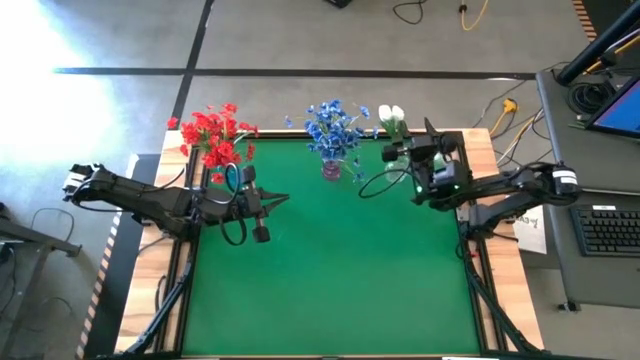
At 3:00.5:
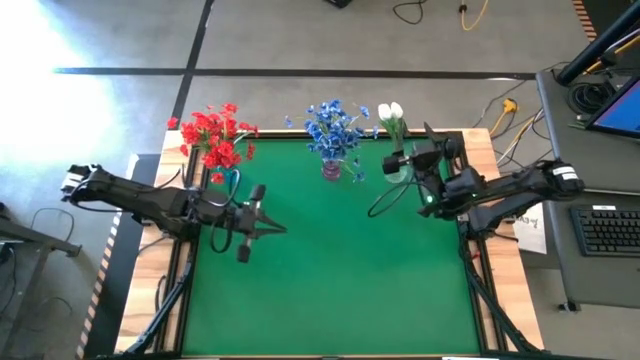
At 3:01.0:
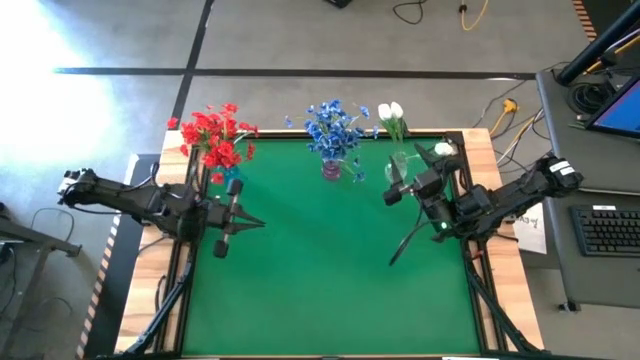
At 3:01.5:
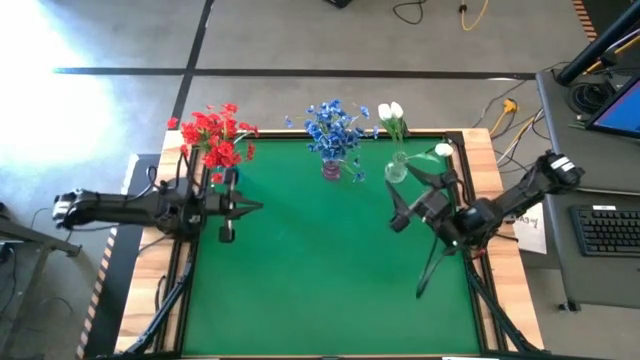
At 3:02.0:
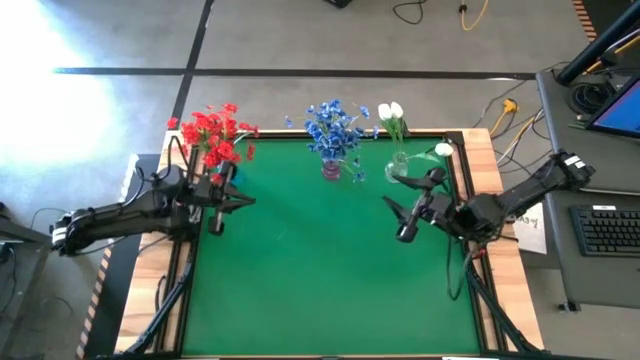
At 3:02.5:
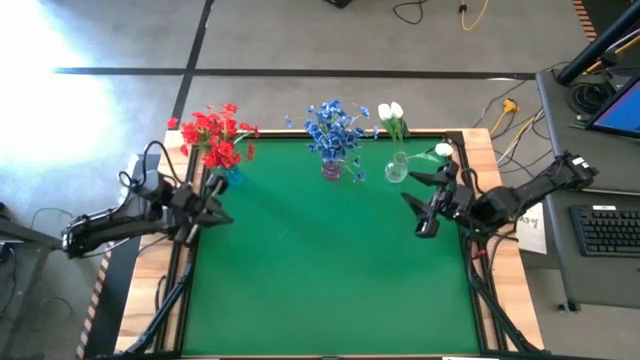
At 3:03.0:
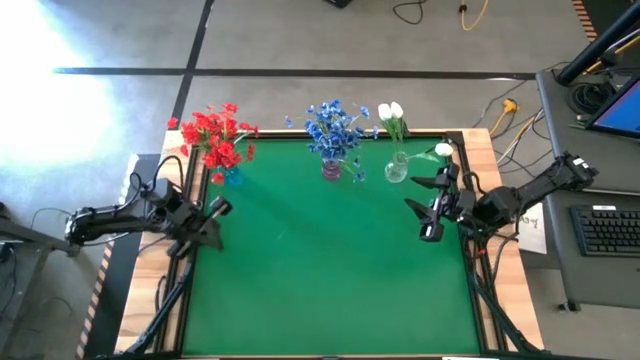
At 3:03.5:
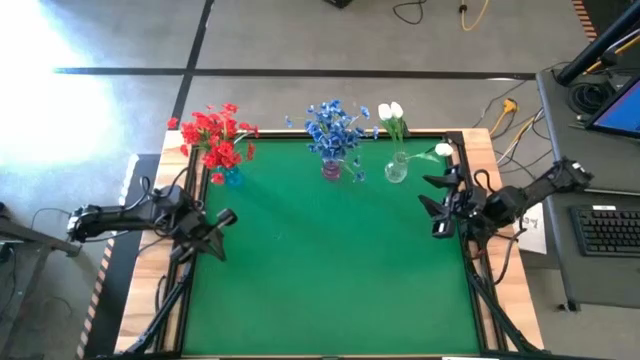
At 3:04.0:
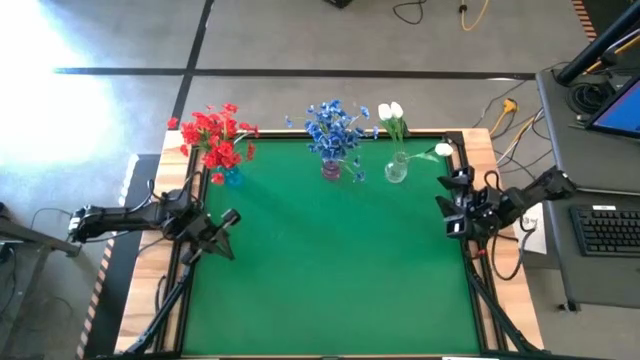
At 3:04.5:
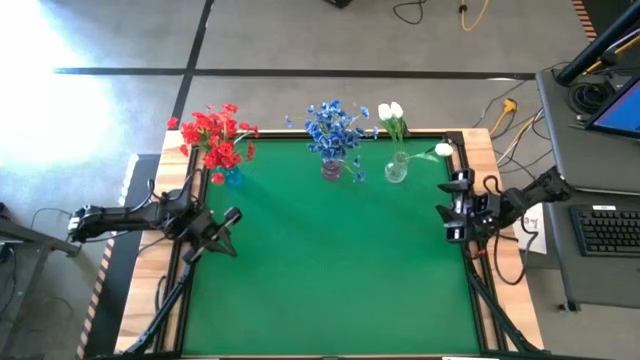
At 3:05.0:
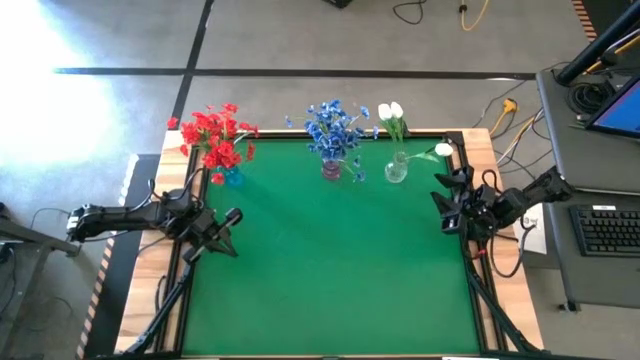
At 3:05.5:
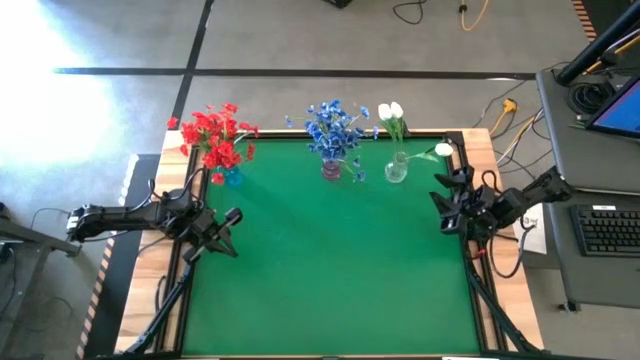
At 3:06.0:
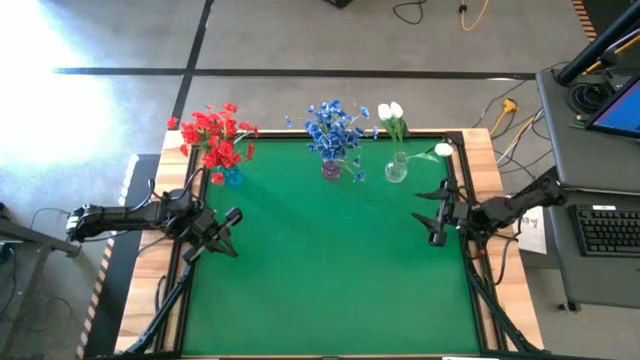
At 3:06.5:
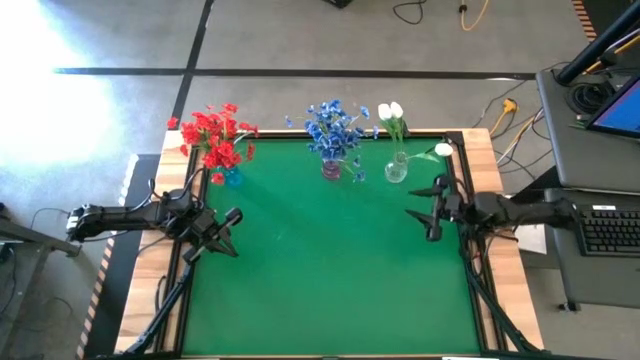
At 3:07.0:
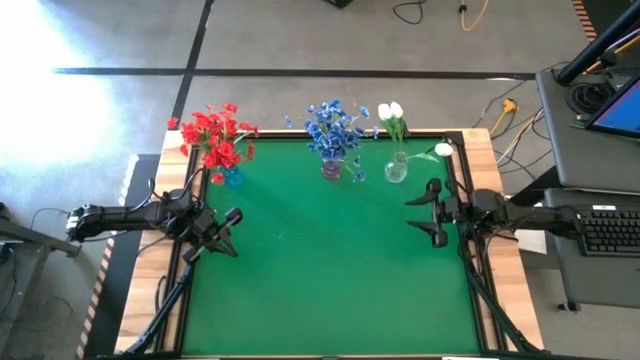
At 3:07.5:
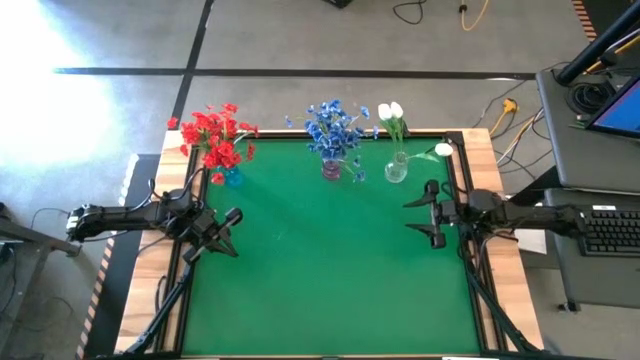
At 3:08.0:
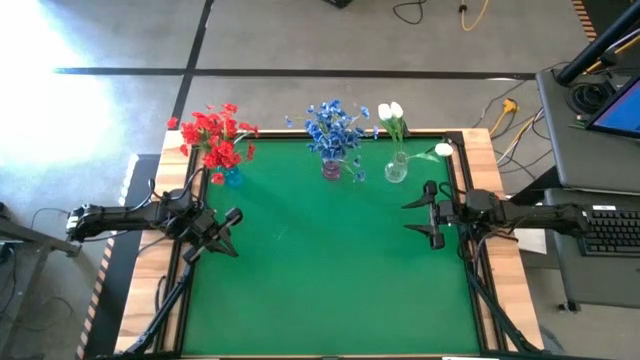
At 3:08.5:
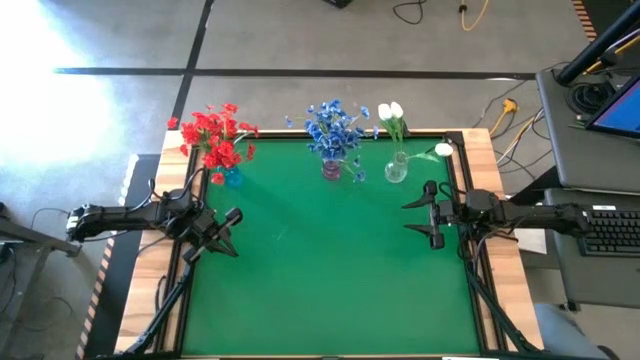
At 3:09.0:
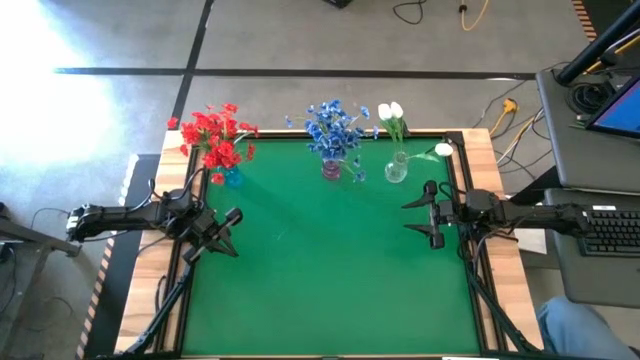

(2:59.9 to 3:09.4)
Task: Sort flowers into vase by color
Return to Home Position

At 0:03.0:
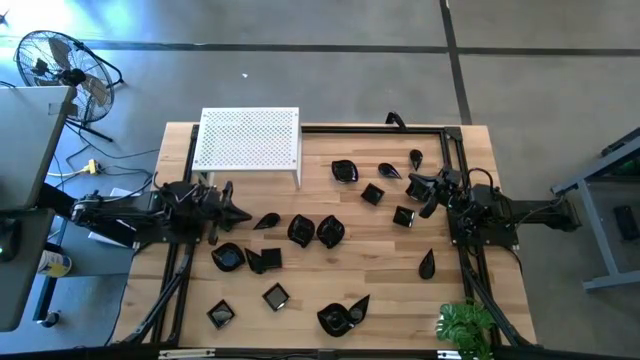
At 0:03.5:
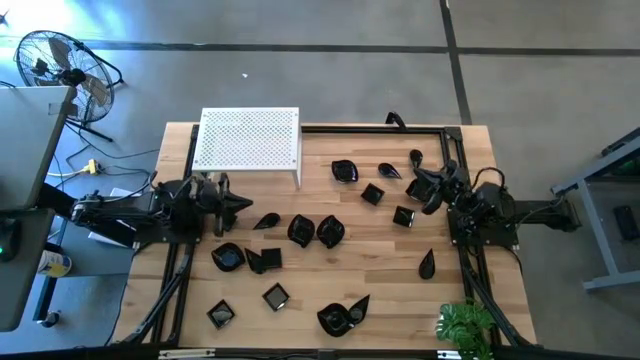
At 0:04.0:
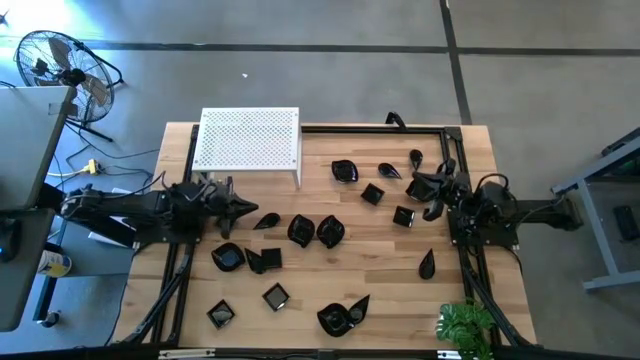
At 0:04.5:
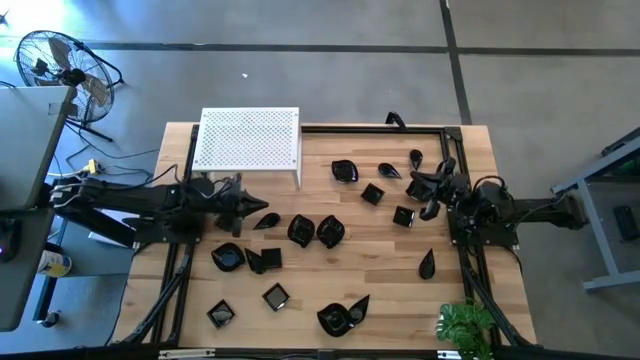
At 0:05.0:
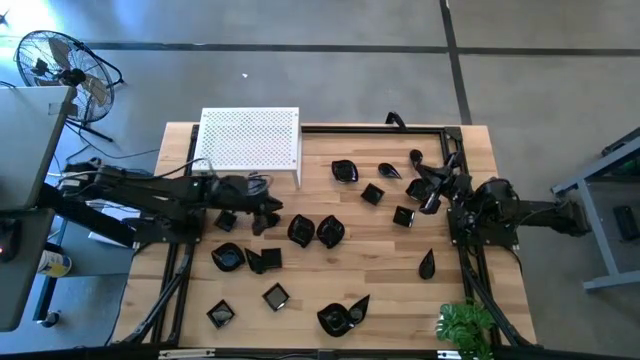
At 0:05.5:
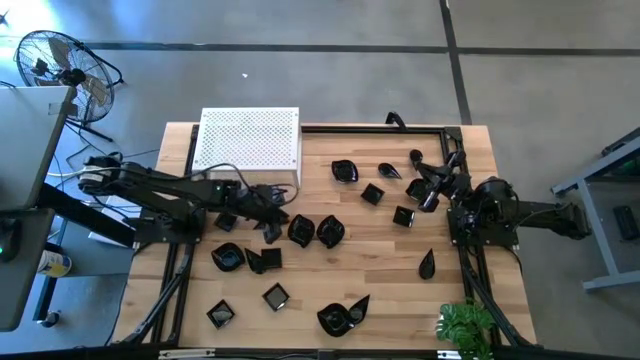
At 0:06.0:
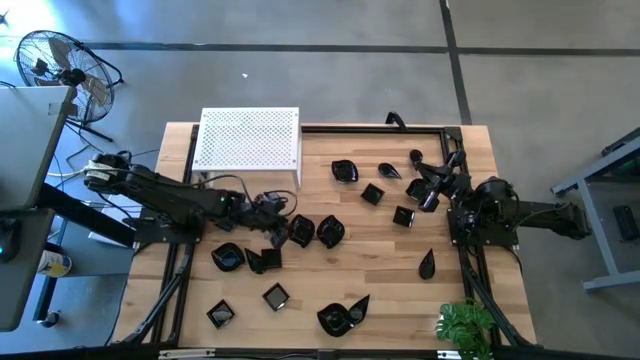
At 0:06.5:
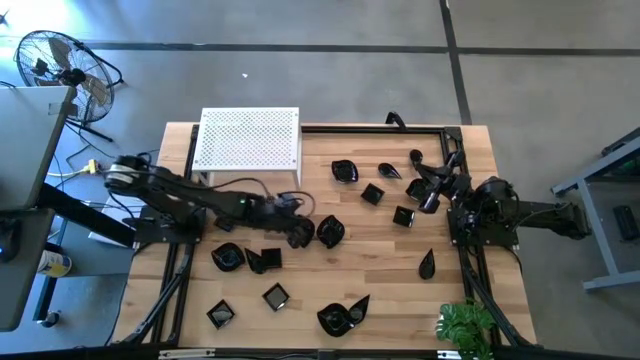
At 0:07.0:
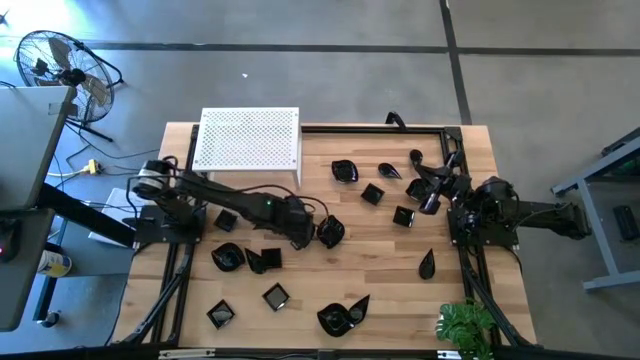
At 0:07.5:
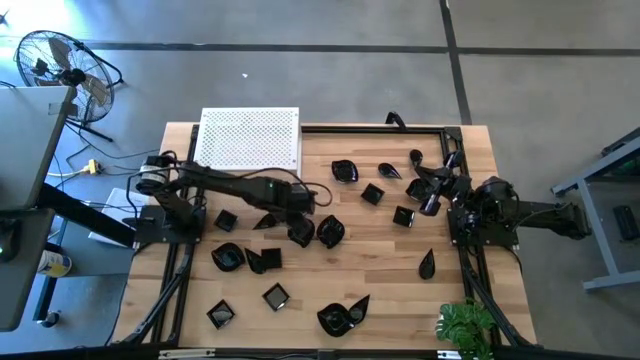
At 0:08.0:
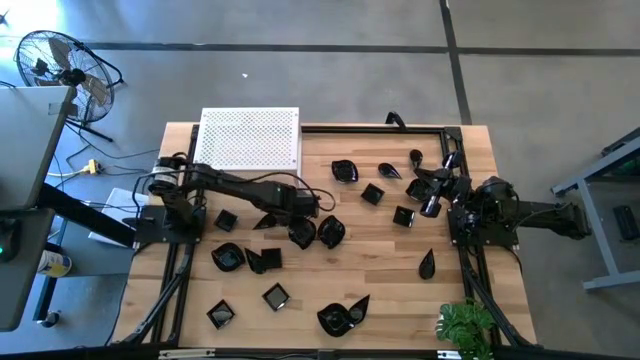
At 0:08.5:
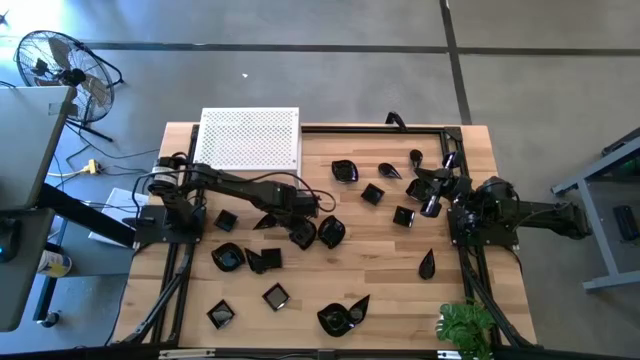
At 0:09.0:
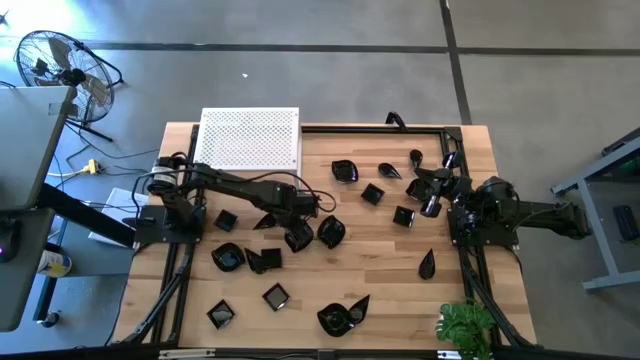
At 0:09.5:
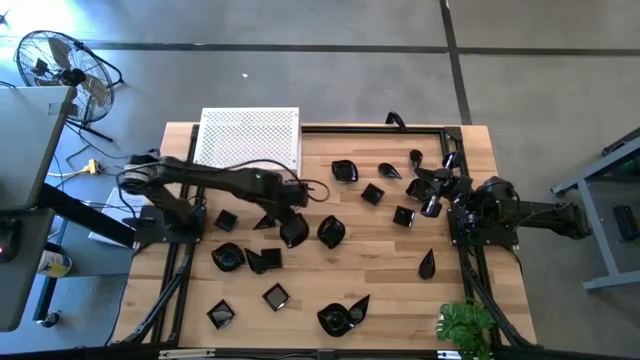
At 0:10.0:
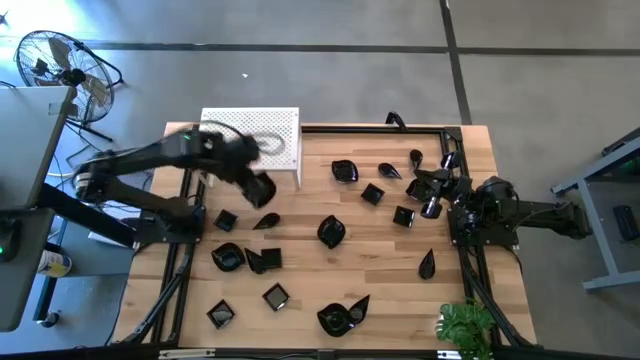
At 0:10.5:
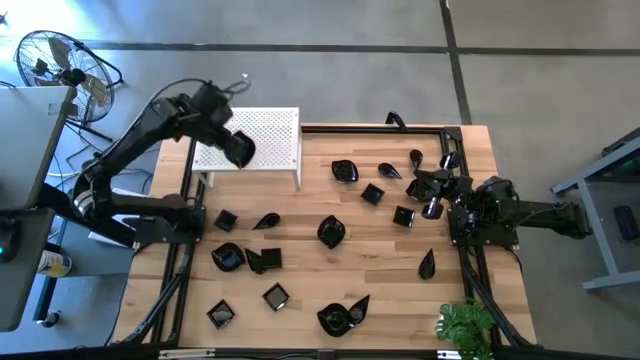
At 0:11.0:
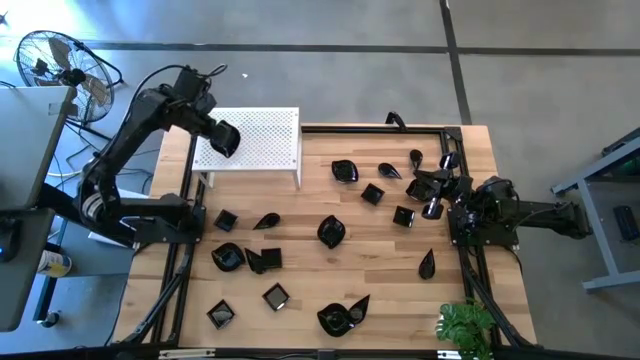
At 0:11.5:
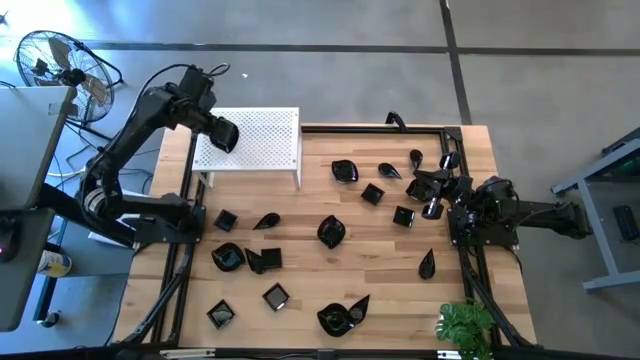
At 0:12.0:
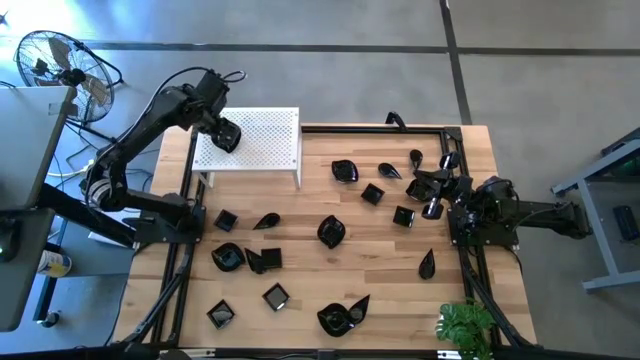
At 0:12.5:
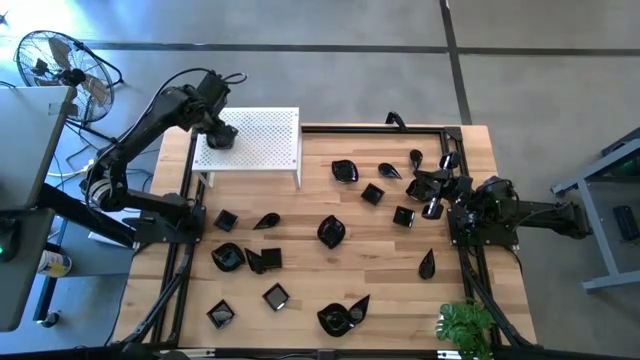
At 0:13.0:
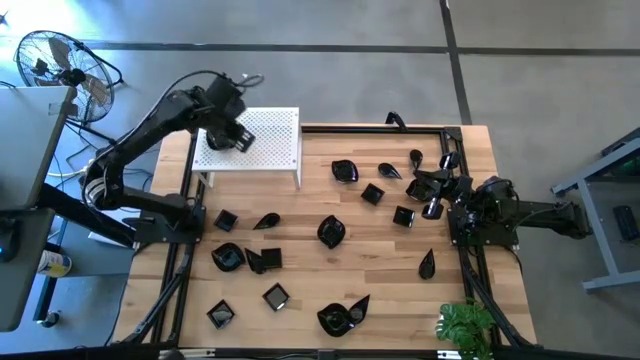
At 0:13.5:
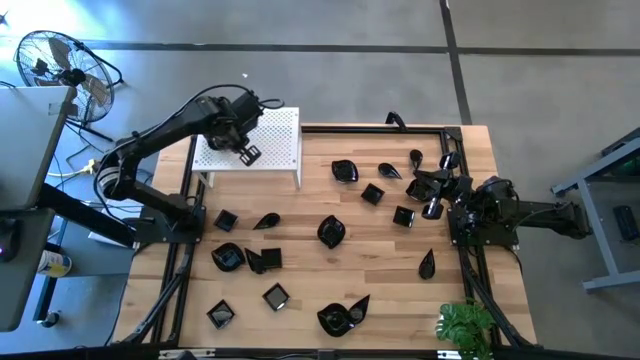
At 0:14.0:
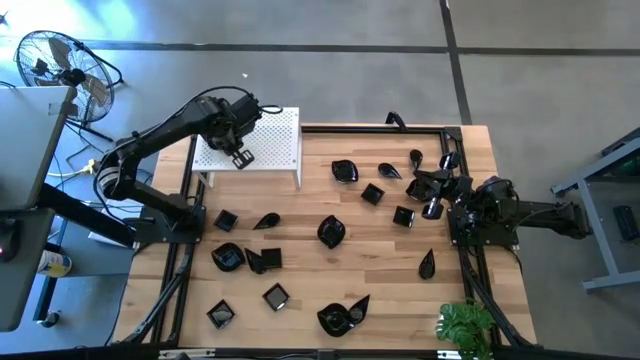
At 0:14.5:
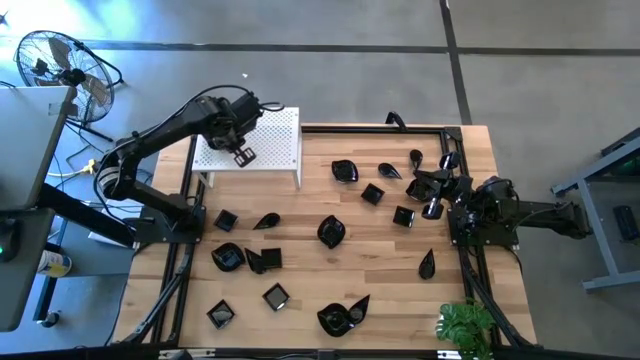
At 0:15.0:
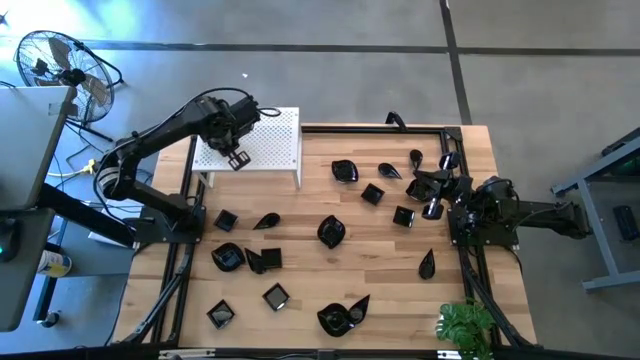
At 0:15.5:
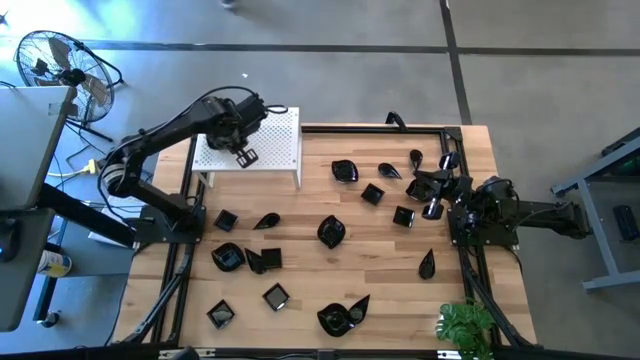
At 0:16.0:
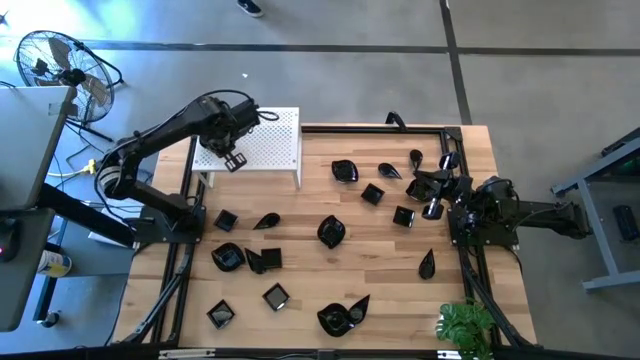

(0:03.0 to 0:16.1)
Task: Pick & Place Mini shaped plates
Put the black leaf shaped plate on the shelf
